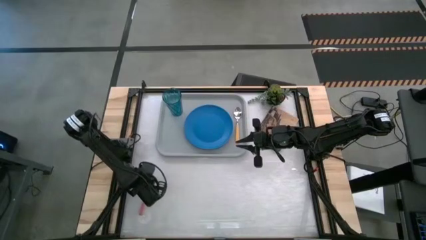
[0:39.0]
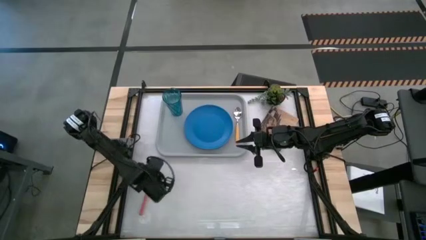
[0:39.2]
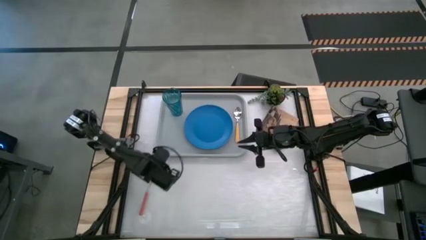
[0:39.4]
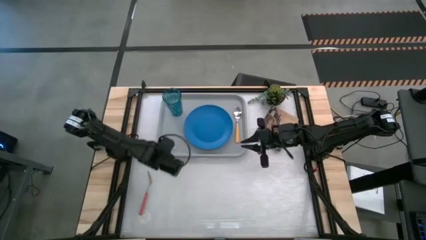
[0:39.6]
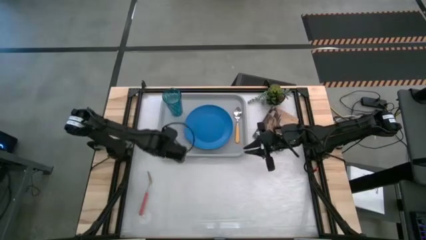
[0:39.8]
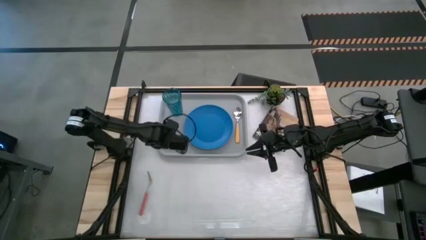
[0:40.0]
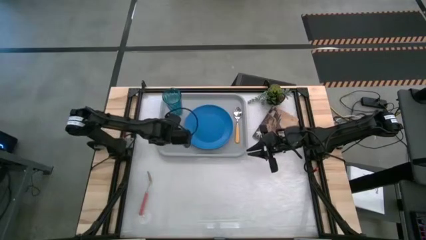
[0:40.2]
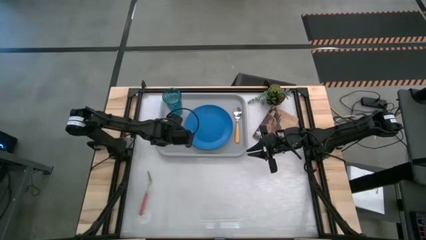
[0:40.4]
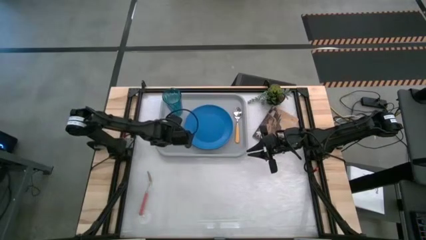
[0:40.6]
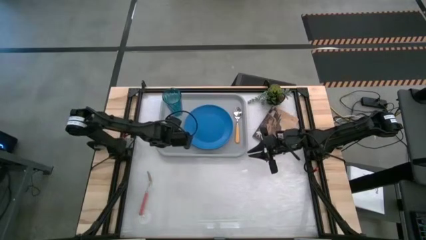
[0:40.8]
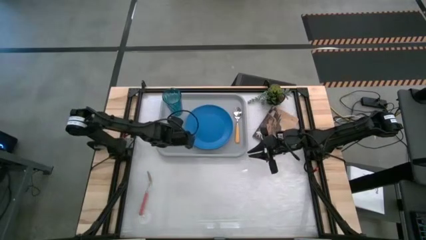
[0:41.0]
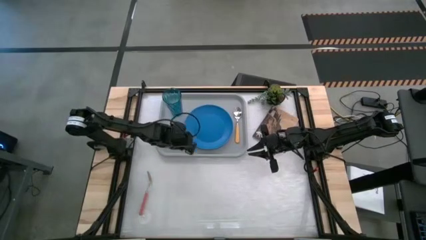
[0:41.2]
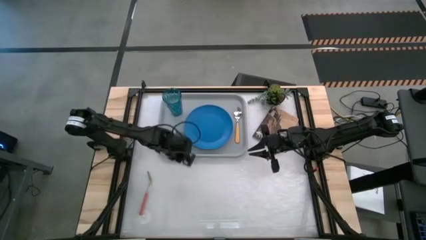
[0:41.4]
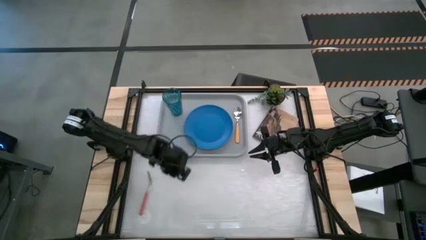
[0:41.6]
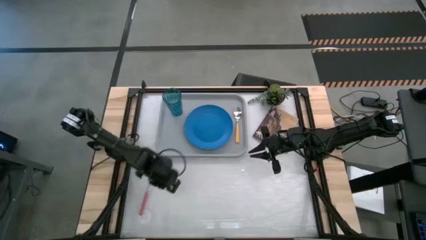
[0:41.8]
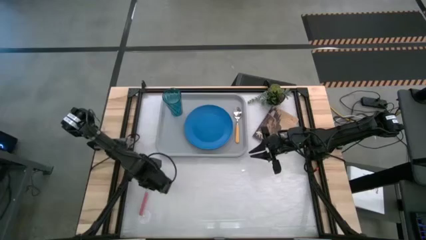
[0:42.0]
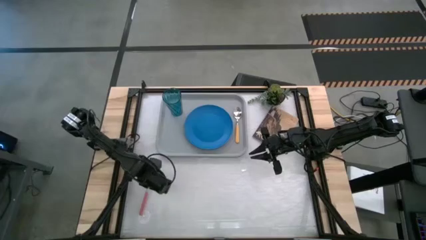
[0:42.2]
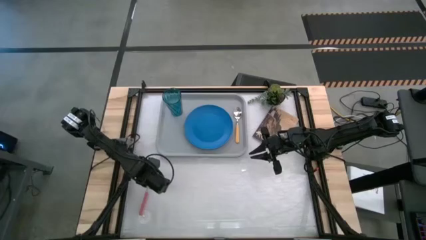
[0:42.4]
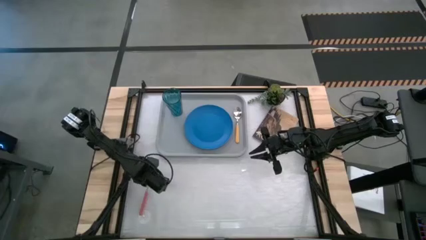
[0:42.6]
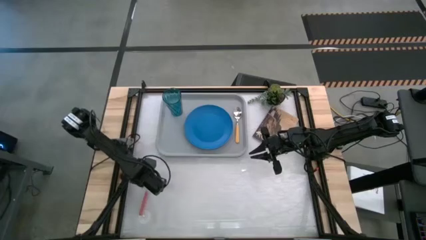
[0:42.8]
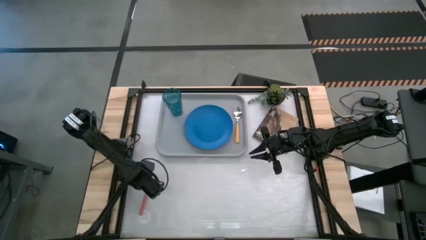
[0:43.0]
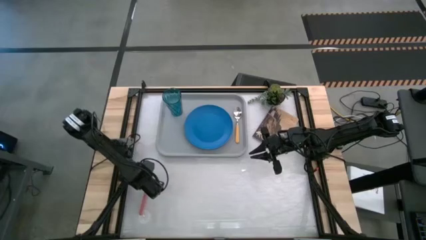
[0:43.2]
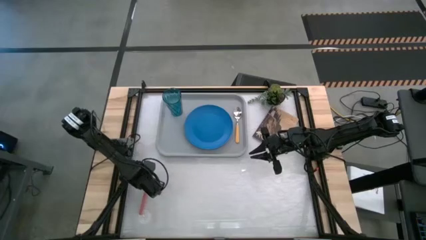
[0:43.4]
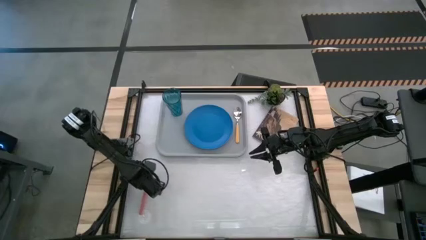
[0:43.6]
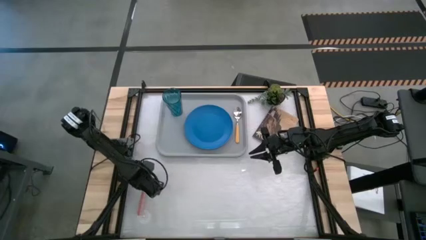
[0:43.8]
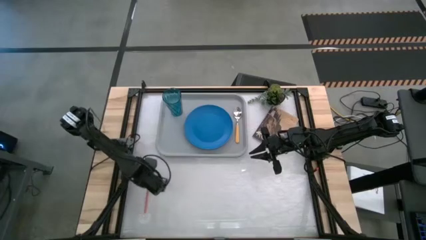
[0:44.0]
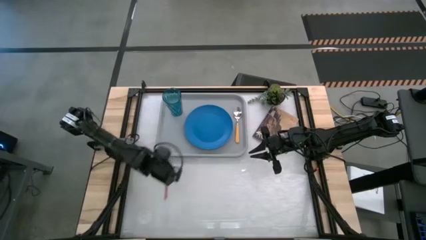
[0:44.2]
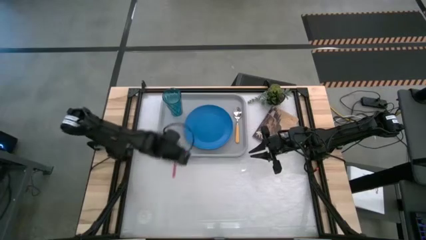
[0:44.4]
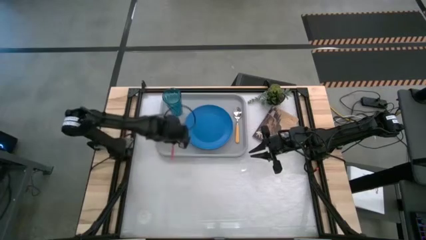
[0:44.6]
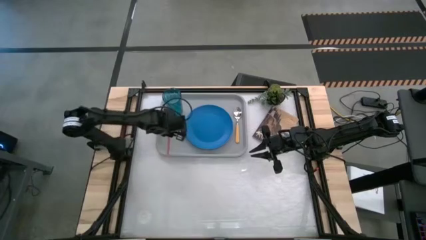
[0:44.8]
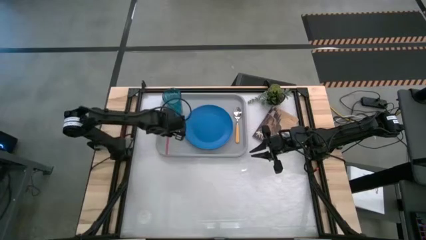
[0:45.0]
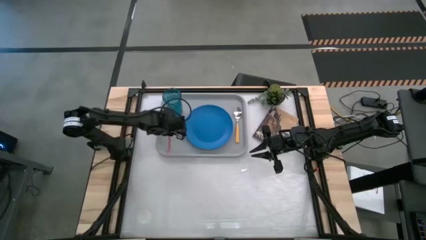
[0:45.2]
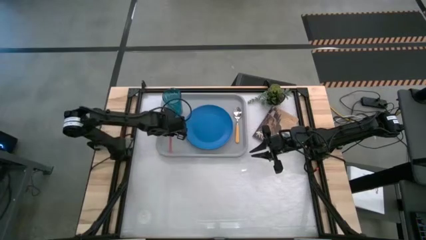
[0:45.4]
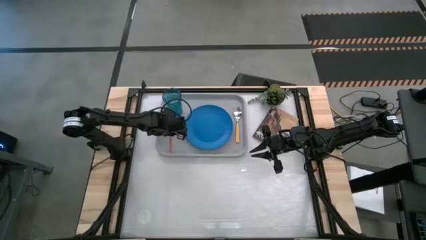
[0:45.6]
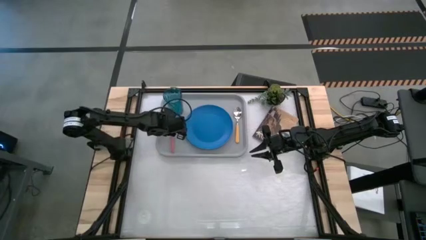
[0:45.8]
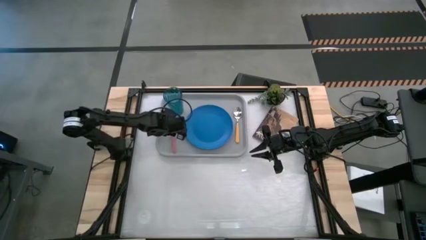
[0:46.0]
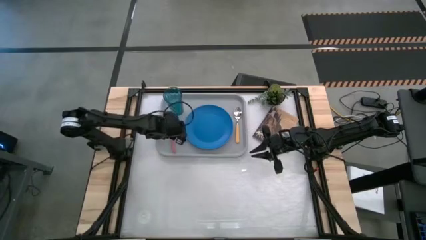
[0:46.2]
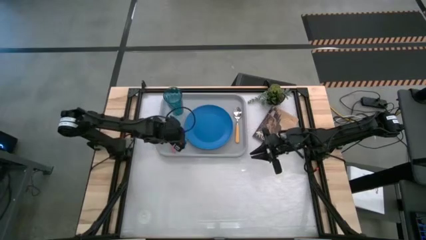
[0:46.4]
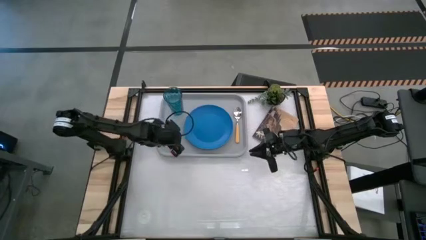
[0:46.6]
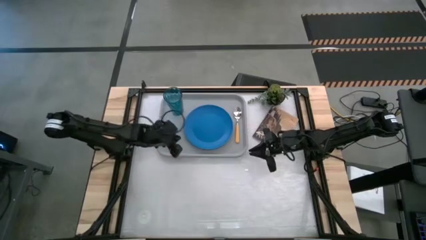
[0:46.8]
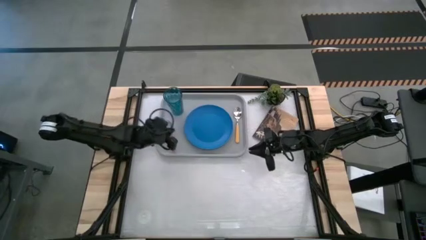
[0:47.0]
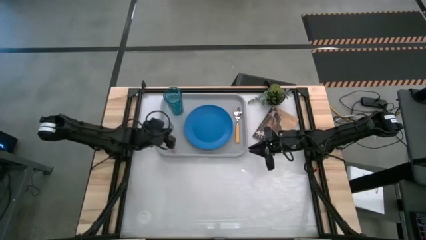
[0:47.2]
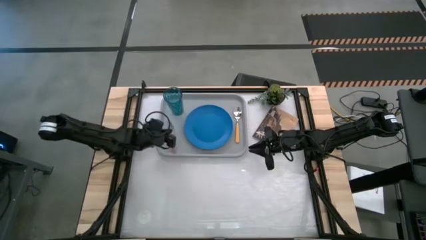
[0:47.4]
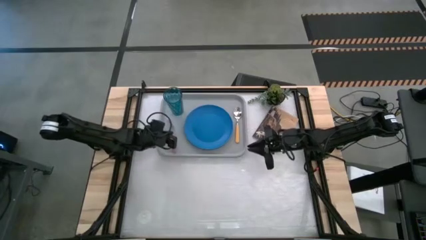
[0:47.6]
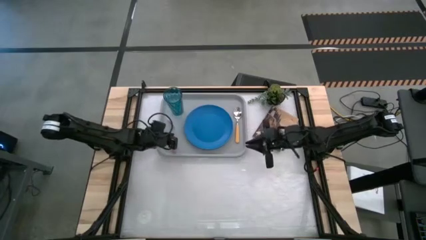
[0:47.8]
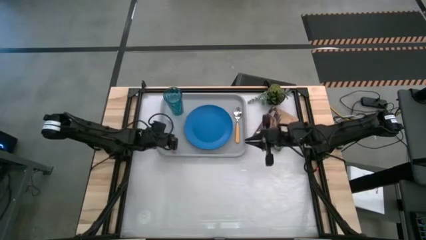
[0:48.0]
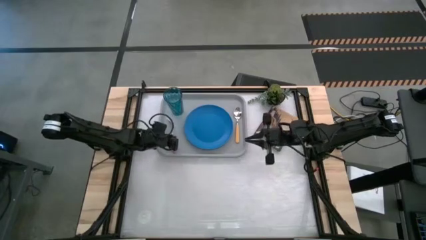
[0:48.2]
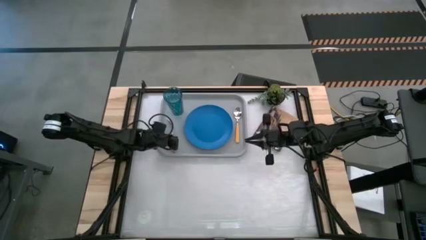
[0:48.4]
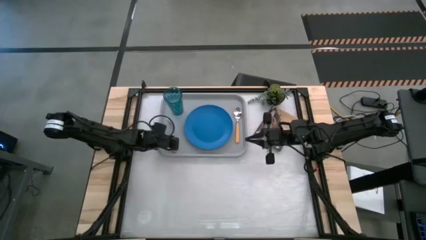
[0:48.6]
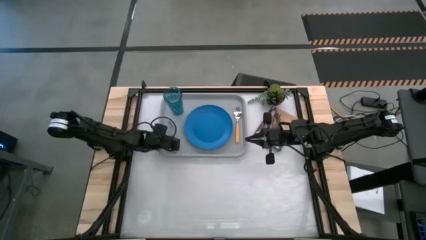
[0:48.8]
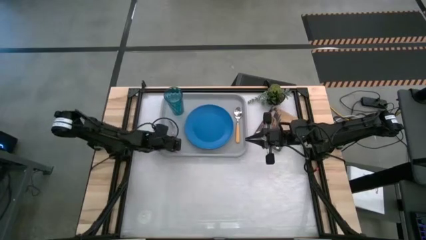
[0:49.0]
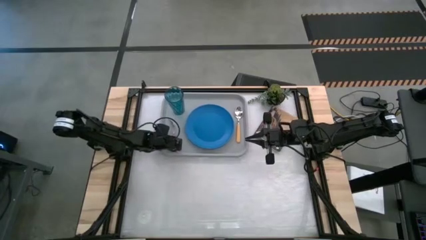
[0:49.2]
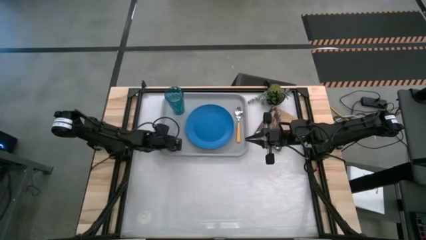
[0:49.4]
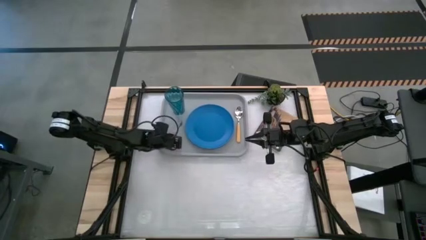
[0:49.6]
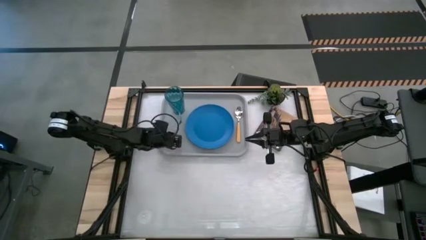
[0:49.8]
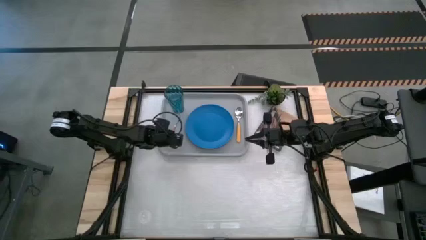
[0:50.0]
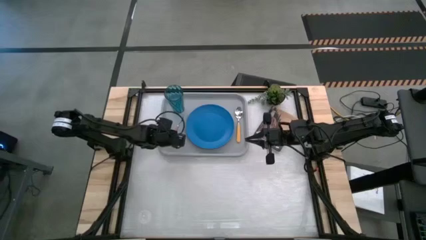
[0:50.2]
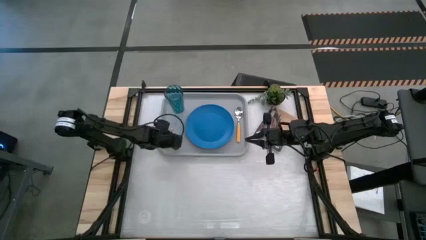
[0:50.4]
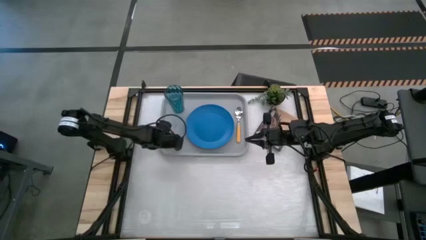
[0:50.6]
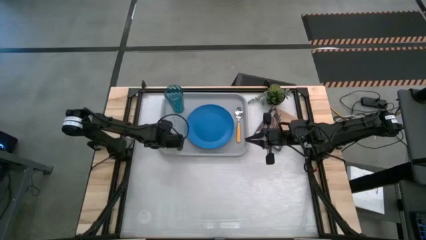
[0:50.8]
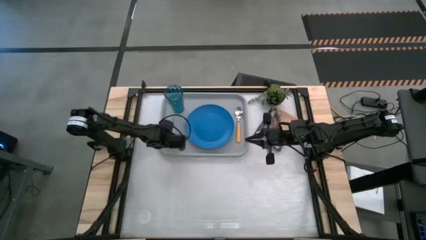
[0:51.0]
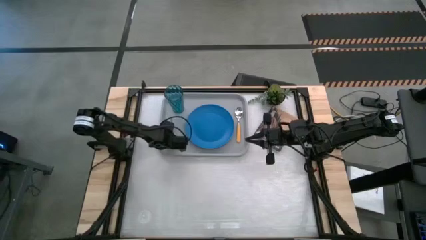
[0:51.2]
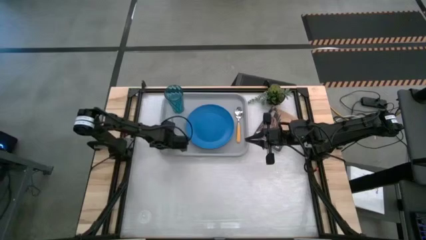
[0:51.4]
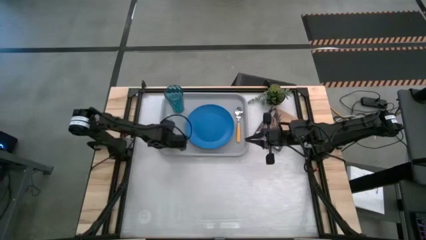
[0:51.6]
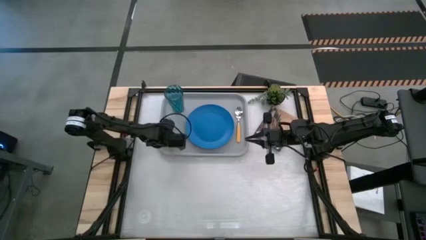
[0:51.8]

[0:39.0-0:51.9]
Task: Pick and place plate/cup/fork/spoon on tray
Put the pink fork to the left side of the blue plate on the gray tray

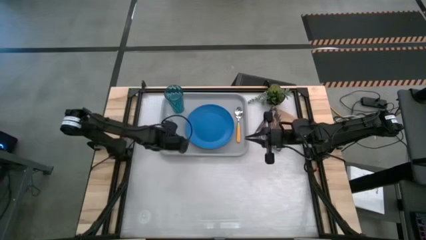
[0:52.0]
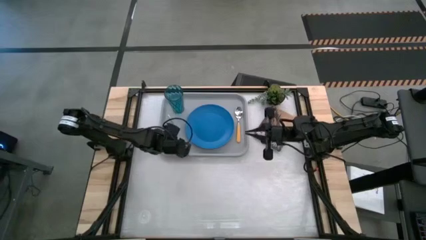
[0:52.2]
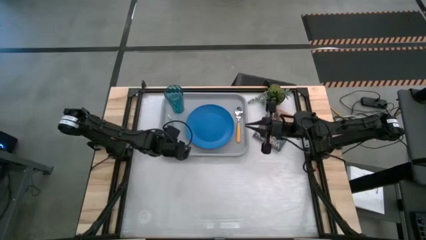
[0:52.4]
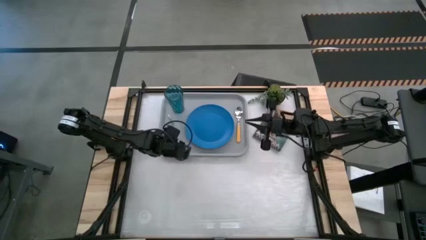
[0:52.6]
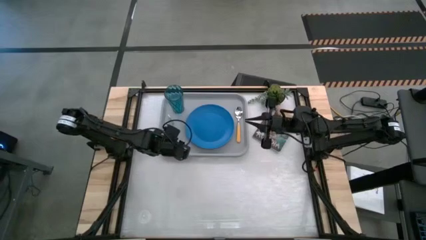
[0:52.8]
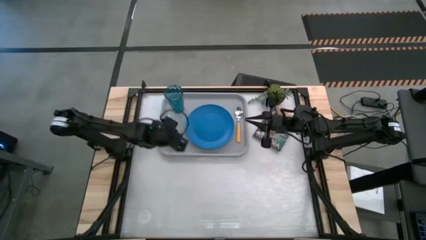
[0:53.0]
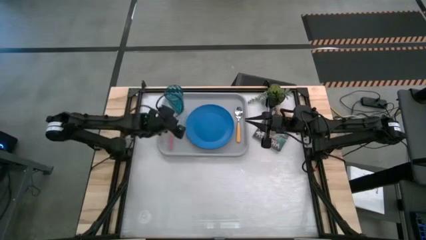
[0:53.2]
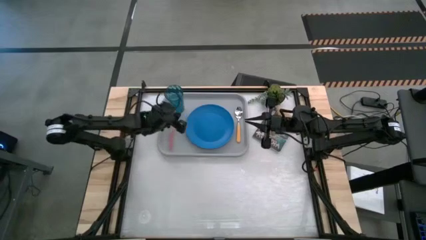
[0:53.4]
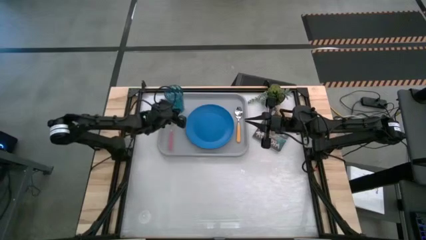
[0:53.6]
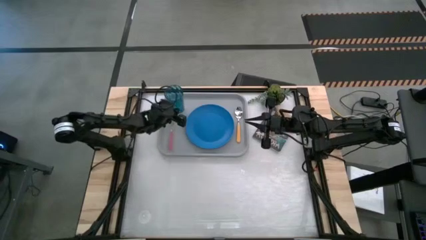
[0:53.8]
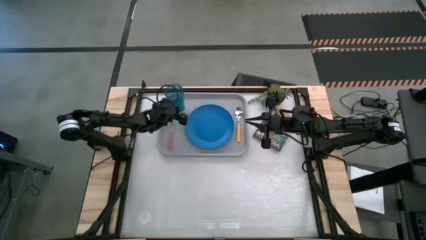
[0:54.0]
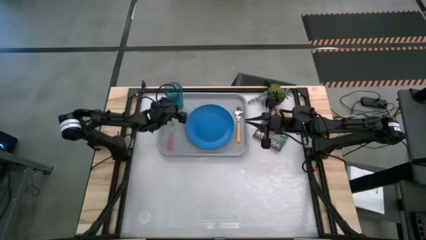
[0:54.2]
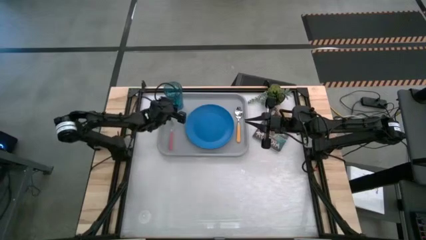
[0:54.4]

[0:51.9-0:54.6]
Adjust the cup on the gray tray

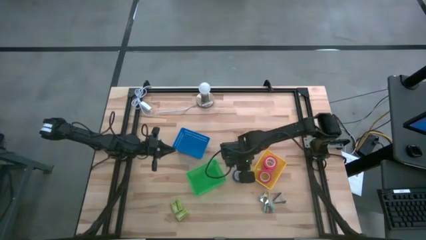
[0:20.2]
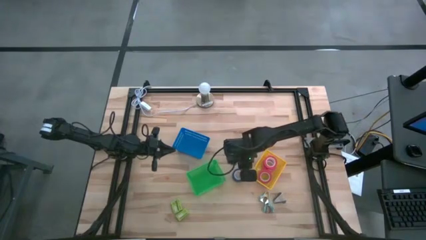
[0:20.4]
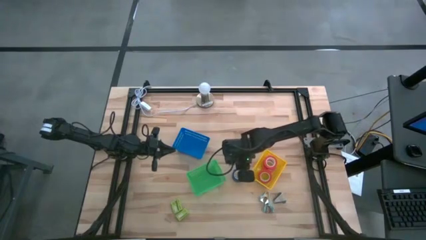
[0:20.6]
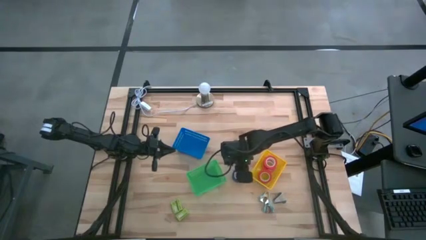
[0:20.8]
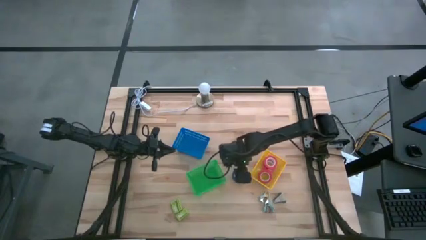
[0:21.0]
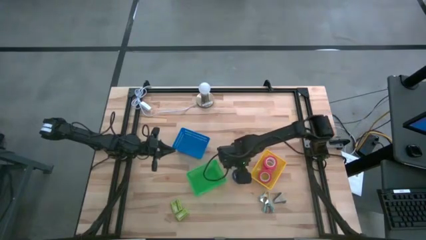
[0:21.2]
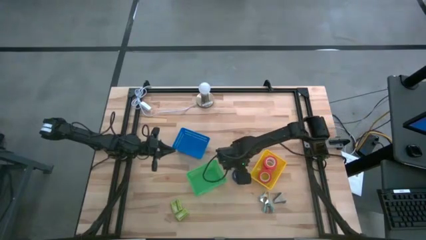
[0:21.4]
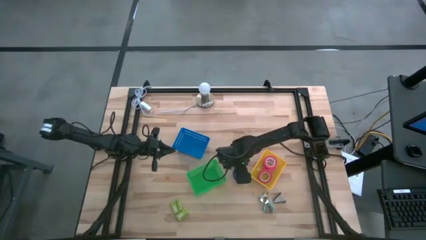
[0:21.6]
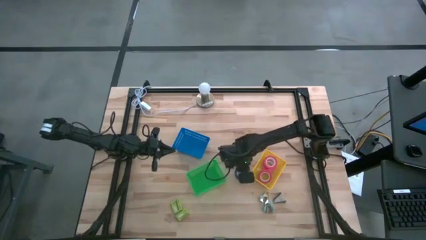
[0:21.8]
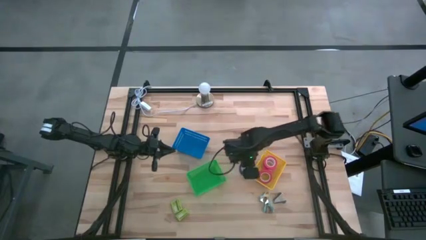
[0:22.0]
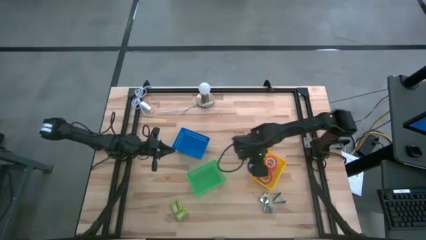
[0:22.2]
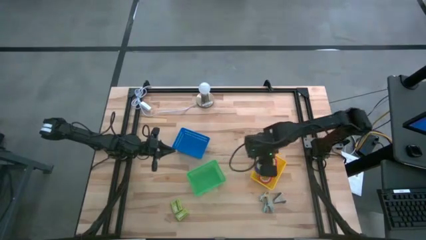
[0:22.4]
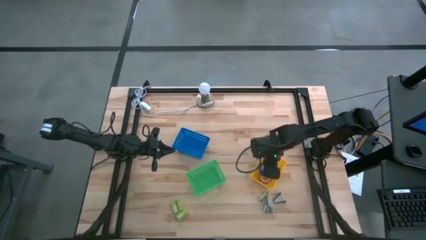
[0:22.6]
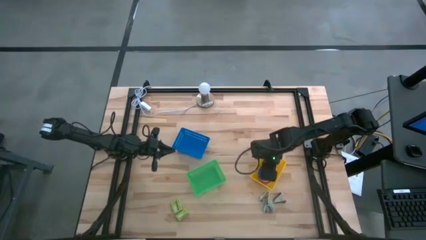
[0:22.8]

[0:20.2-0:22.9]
Task: Pick and place Stapler, Stapler remover, tape
Put the blue tape into the yellow bin
